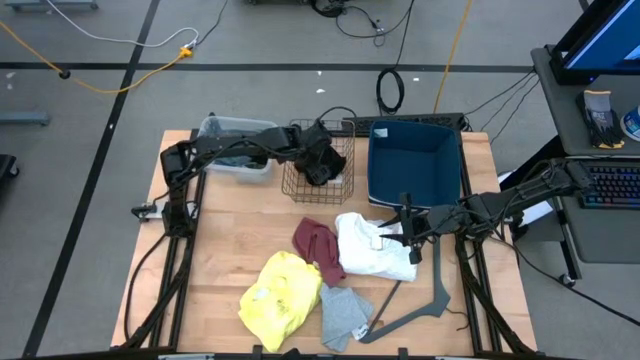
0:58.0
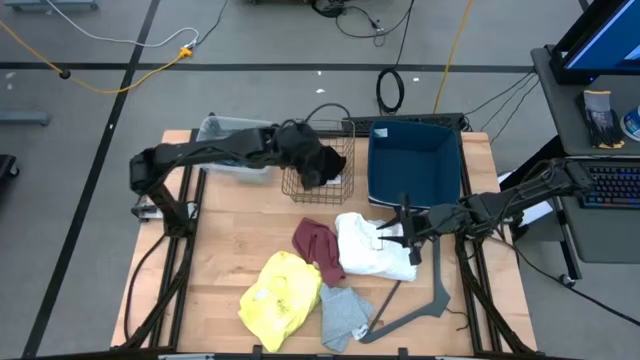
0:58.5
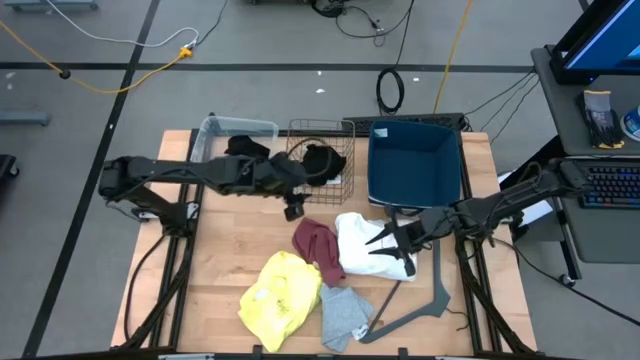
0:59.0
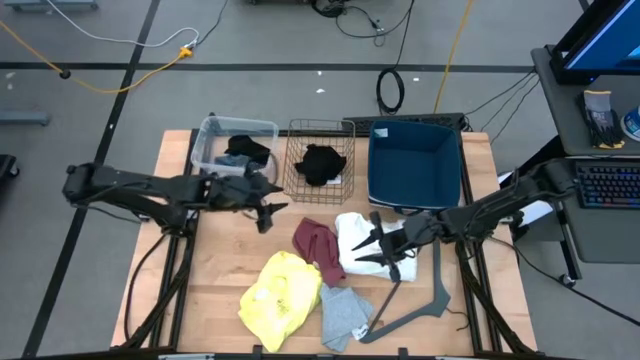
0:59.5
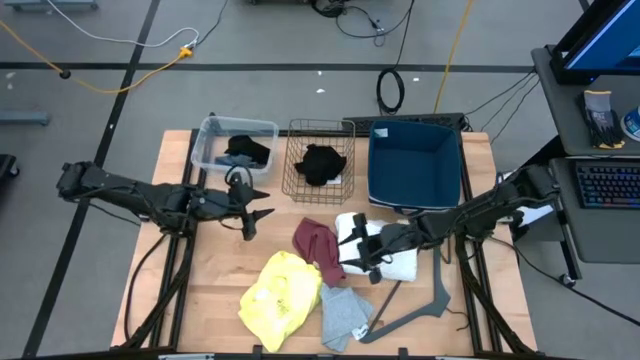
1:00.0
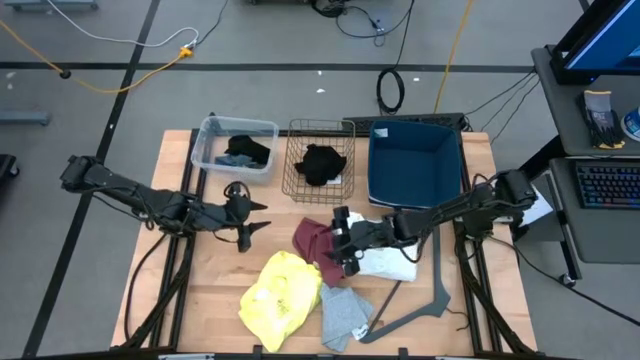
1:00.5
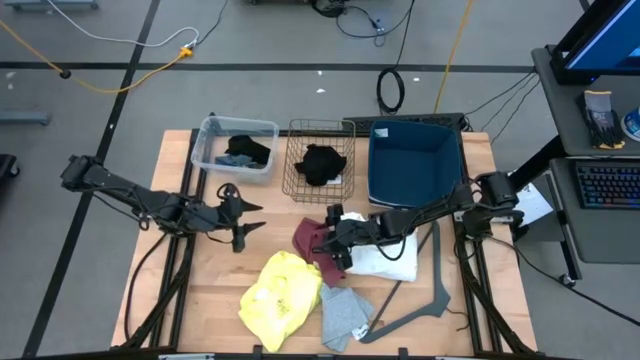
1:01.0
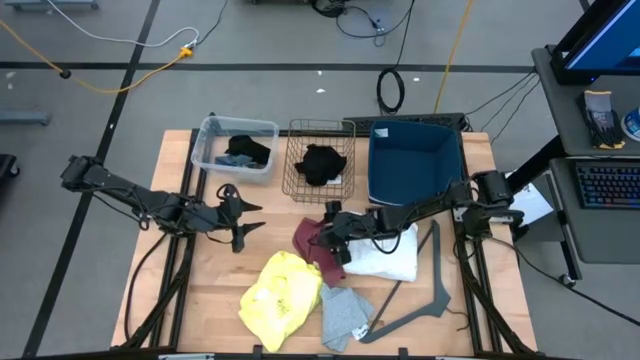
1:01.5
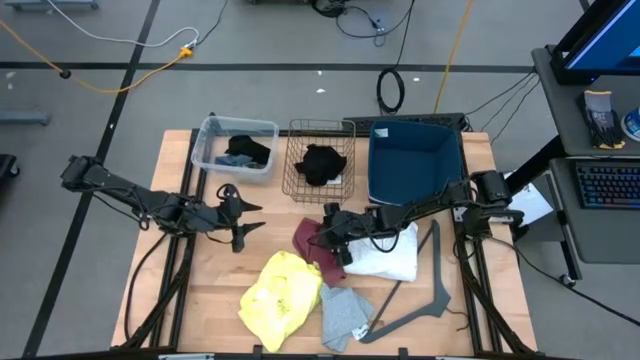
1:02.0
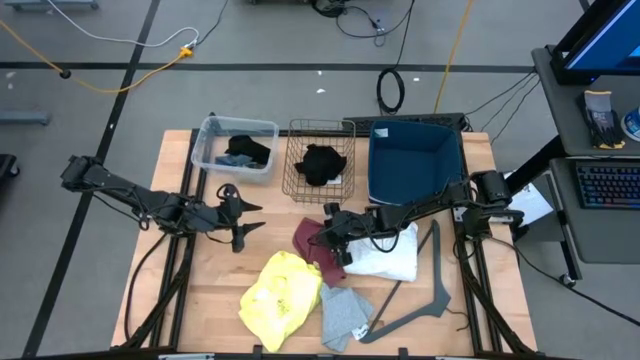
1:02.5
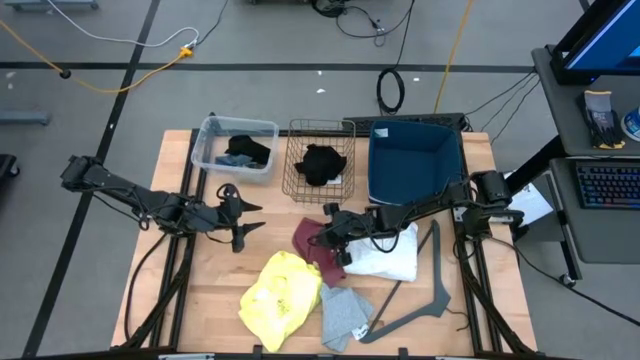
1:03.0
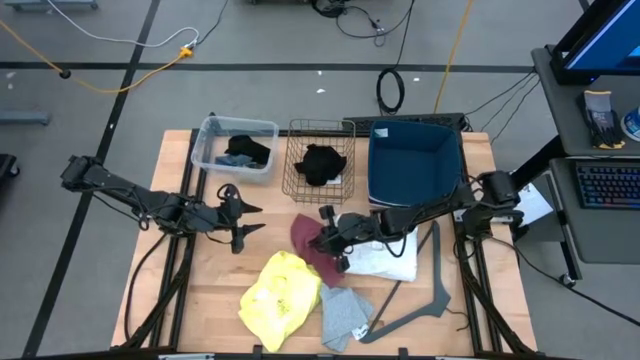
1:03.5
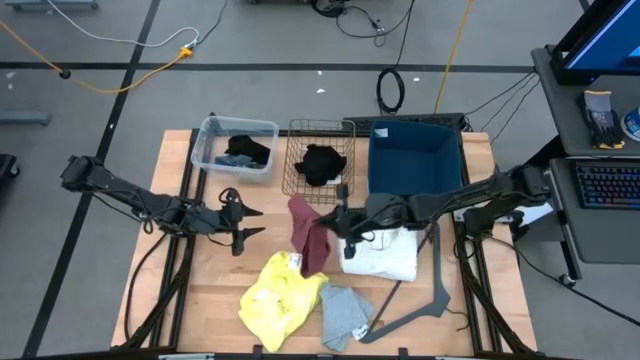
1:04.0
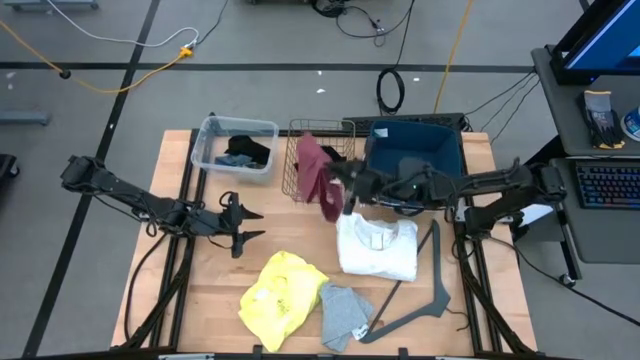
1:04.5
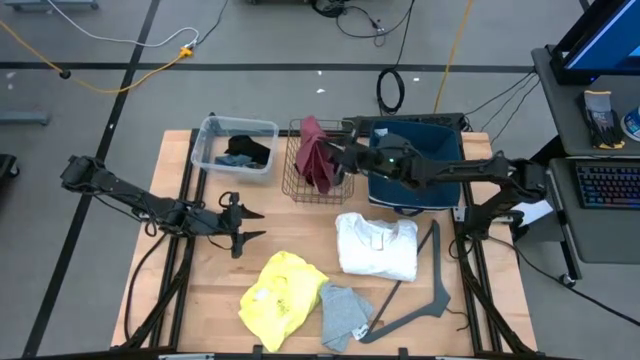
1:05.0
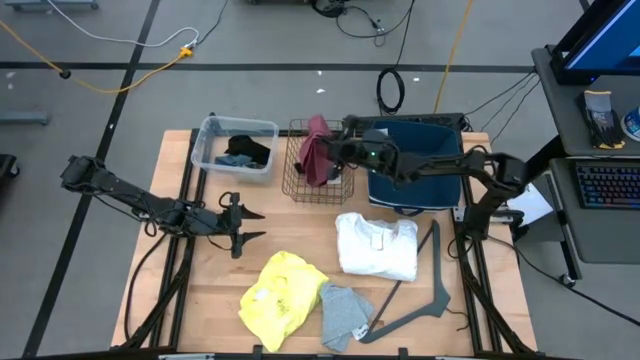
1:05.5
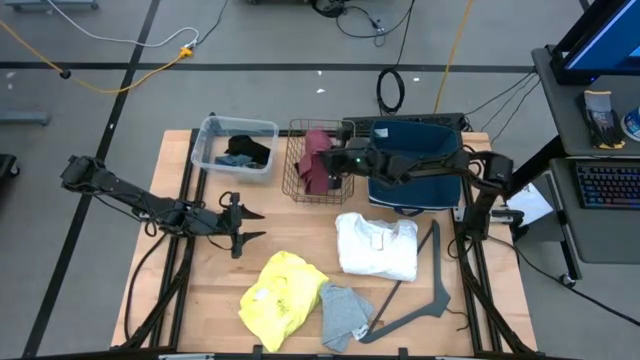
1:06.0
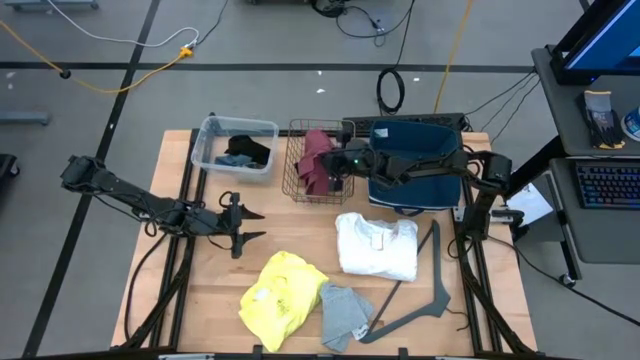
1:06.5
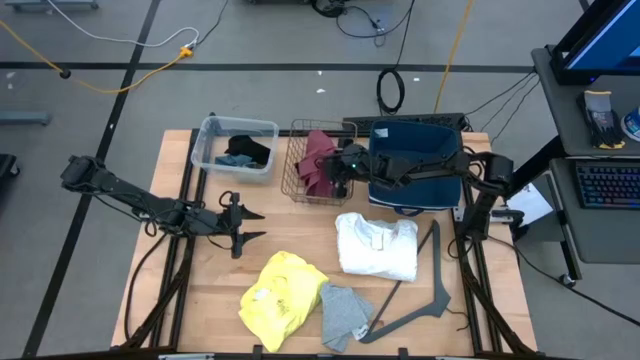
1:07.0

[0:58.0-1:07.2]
Task: Pick & Place Cloths
Put the pink underwear into the black mesh basket

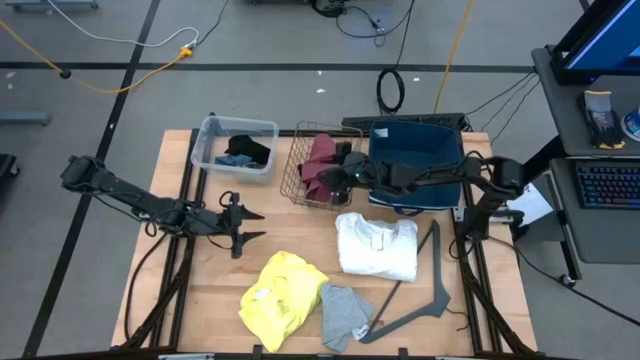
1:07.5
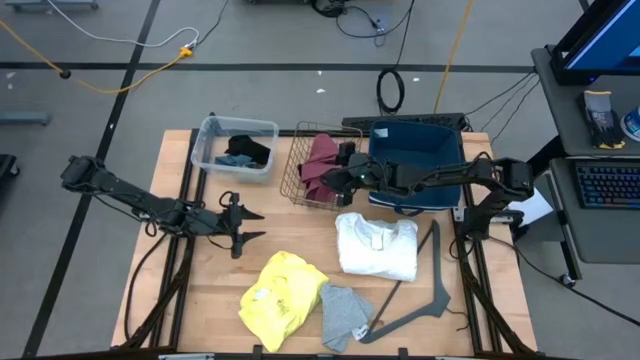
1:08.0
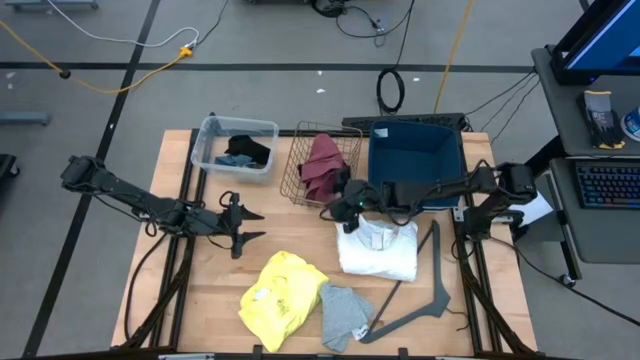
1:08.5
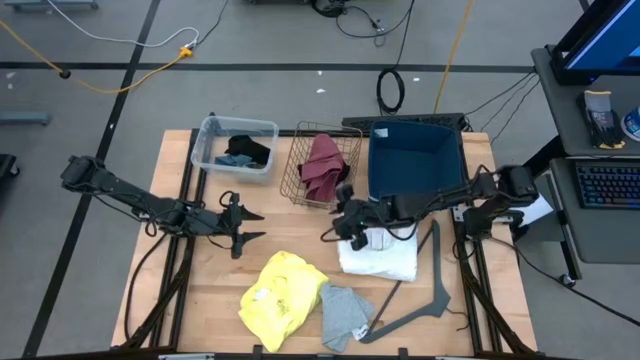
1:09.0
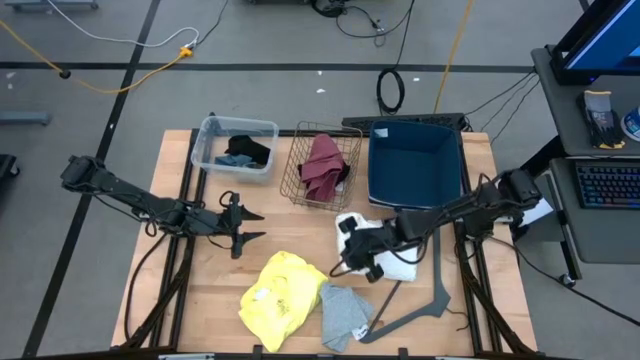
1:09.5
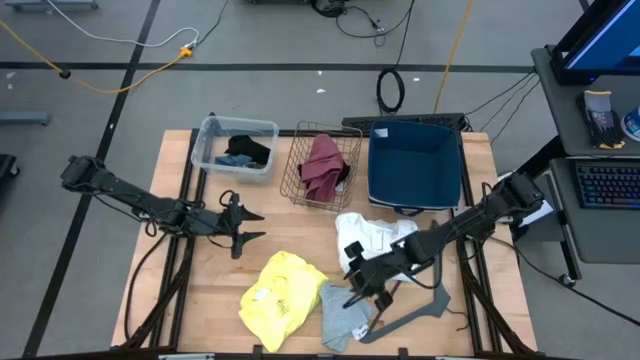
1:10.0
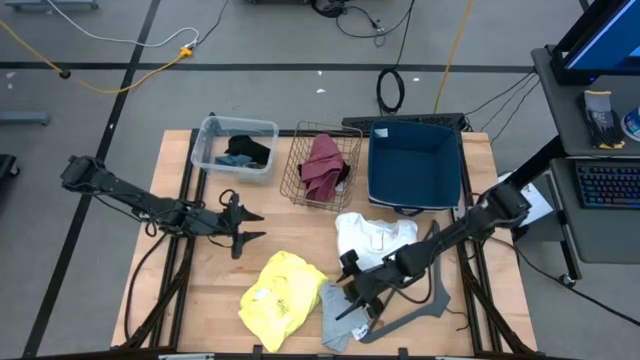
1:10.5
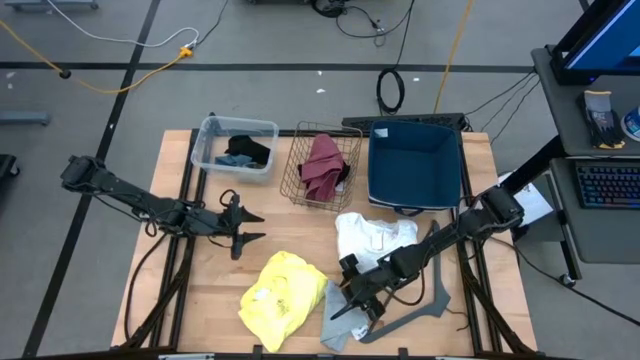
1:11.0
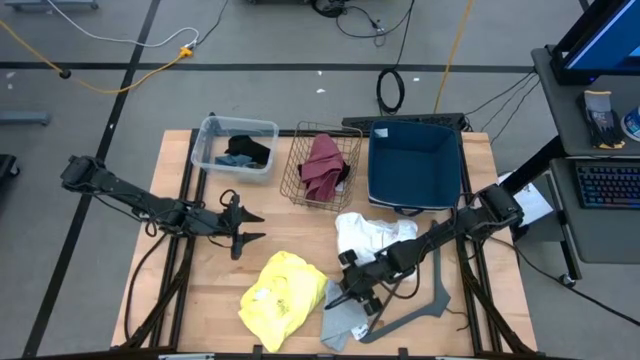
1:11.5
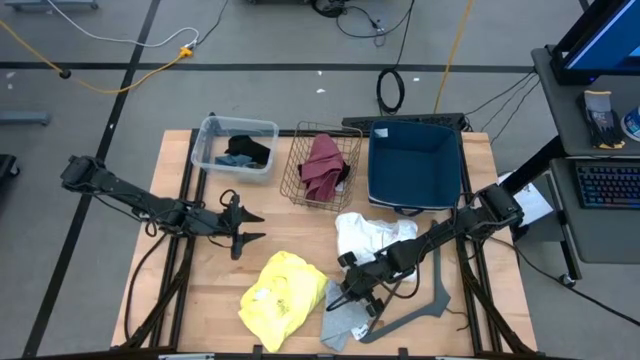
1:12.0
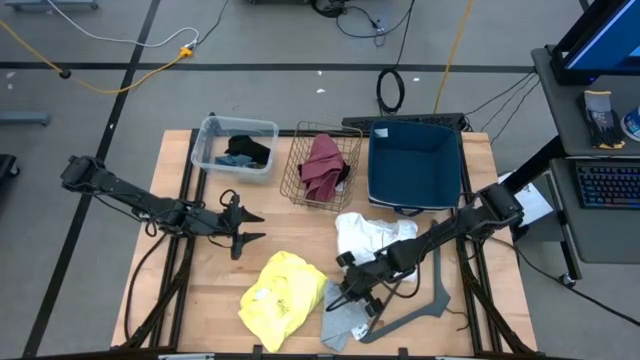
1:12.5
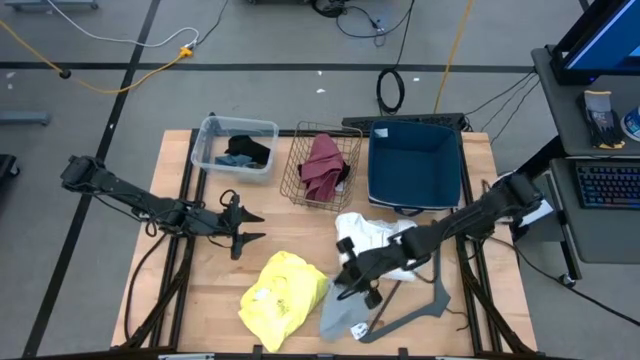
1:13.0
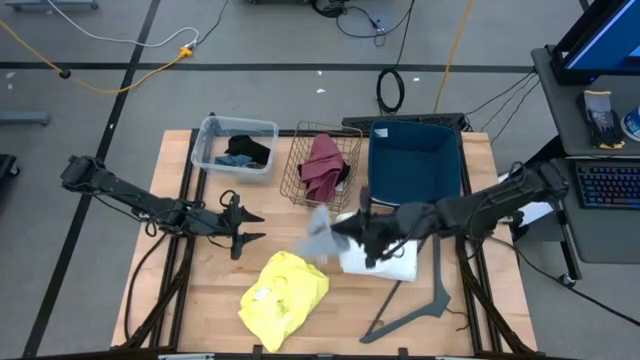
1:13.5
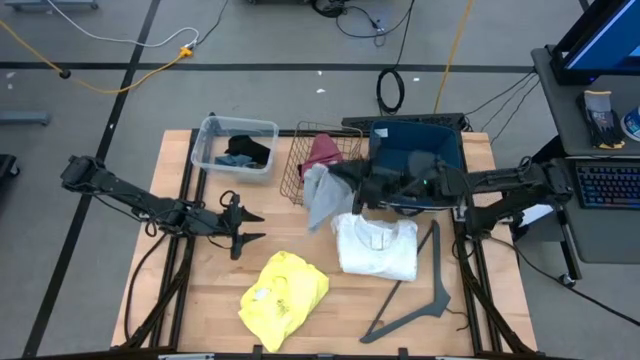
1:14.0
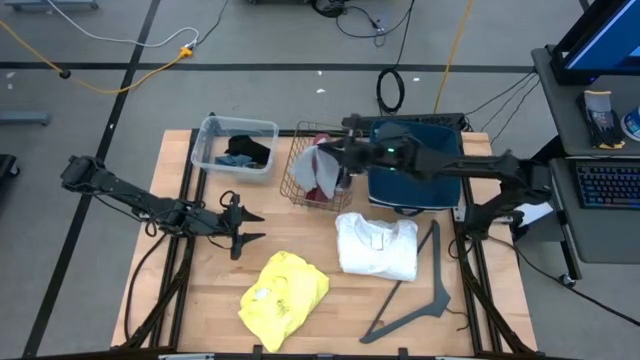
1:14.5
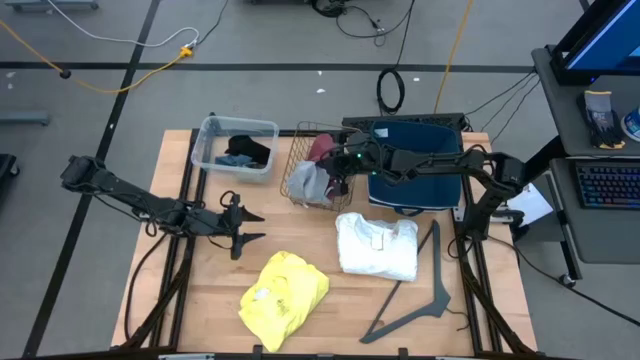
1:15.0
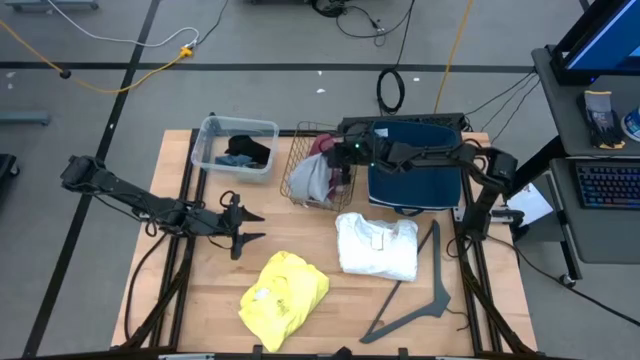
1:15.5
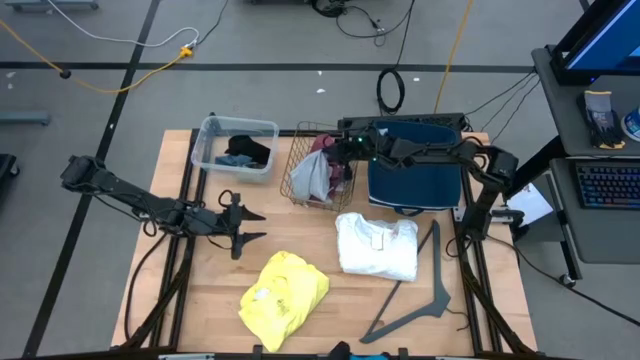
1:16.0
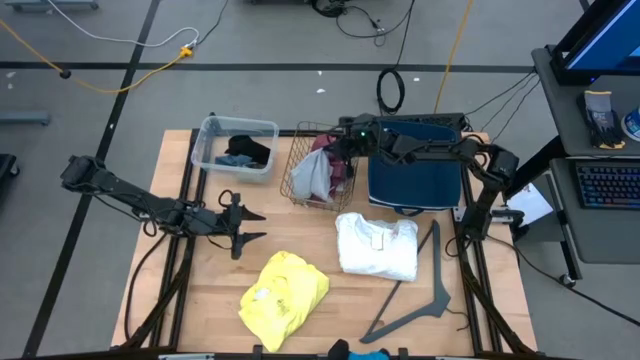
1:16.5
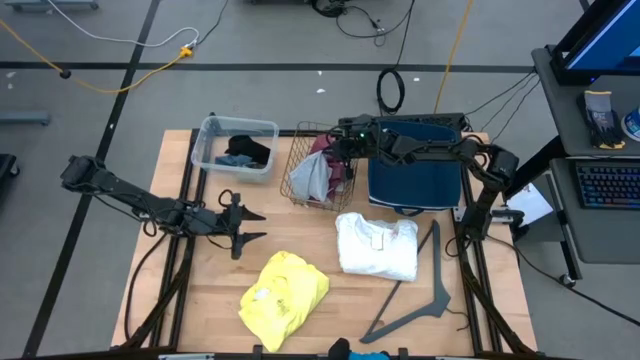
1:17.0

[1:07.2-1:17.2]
Put the gray underwear into the black mesh basket

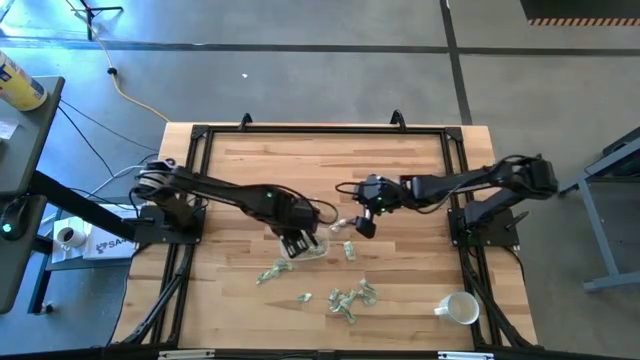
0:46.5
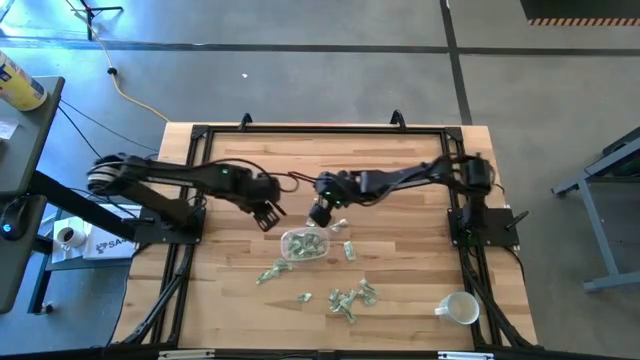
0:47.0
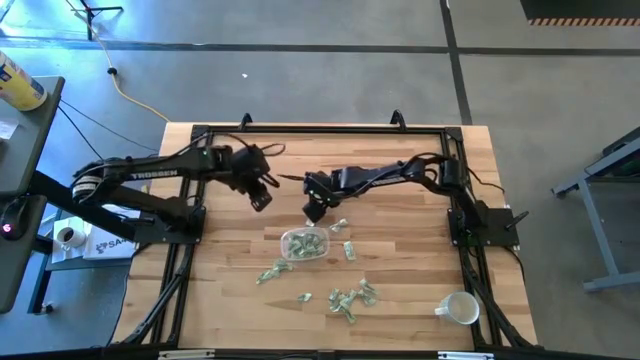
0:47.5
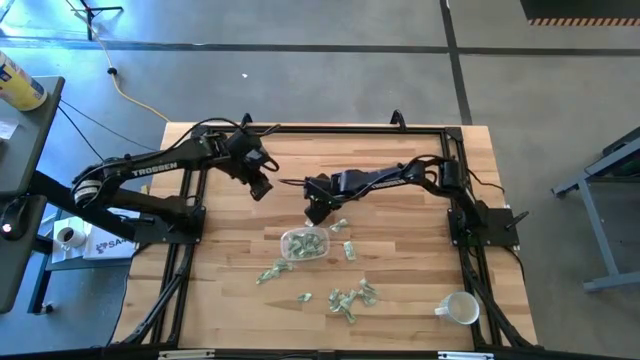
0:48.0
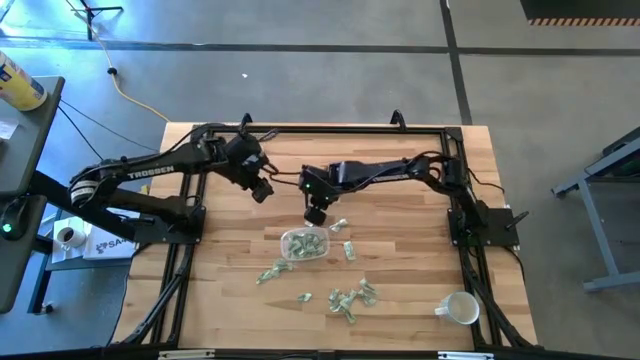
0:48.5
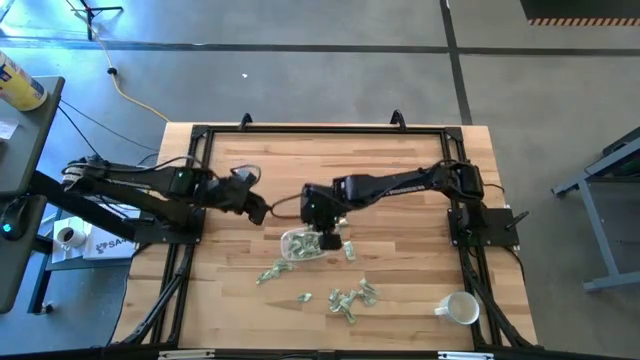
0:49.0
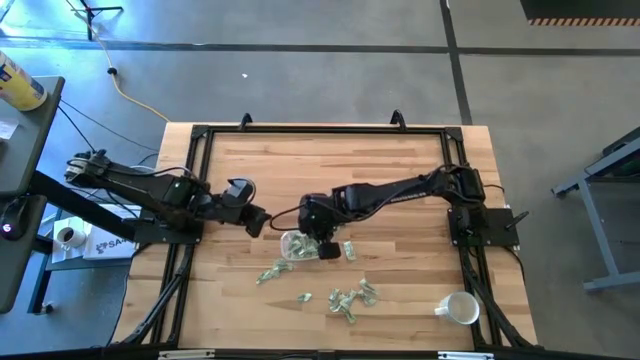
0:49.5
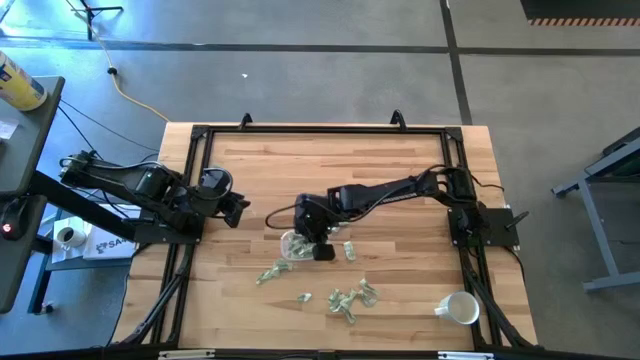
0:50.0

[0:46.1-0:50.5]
Task: Pick and place Stevia / Truvia into bins
Put the green stevia packet into the transparent bin
